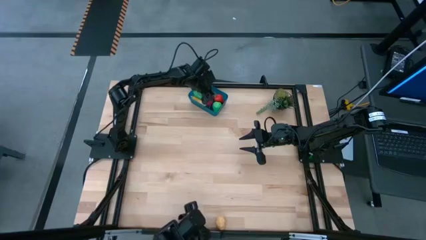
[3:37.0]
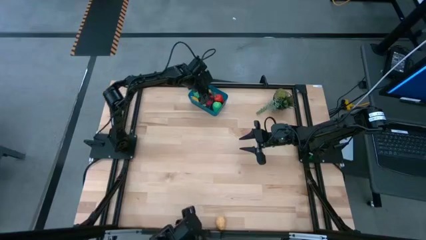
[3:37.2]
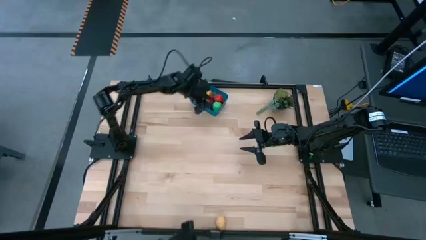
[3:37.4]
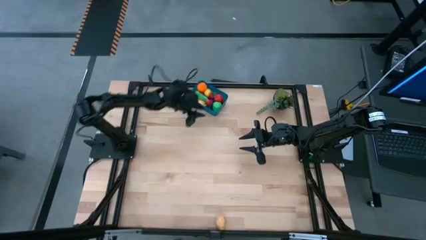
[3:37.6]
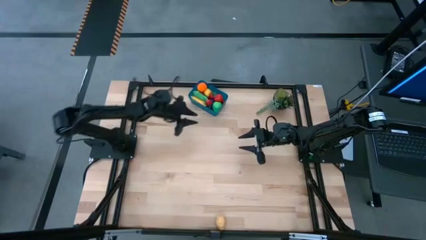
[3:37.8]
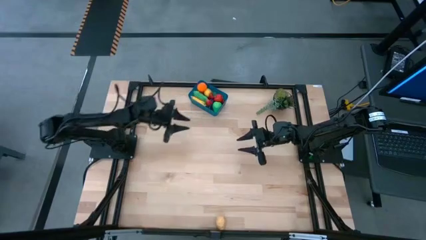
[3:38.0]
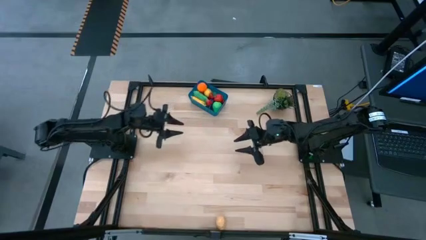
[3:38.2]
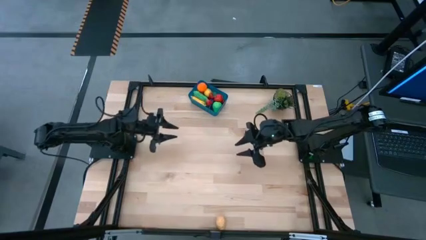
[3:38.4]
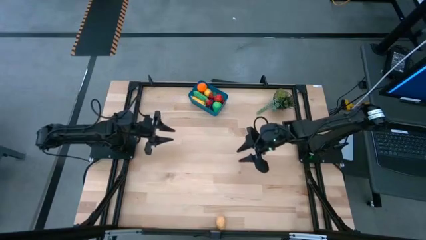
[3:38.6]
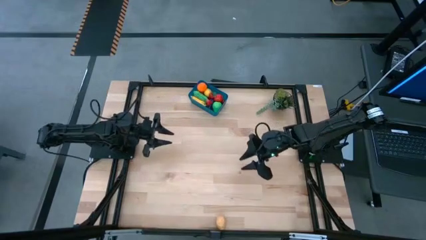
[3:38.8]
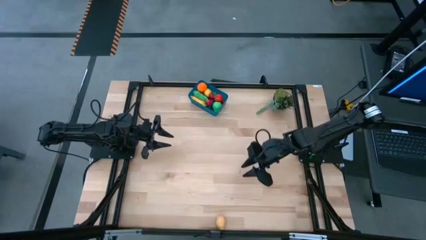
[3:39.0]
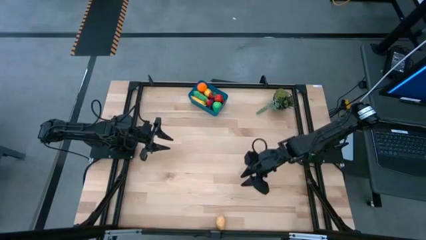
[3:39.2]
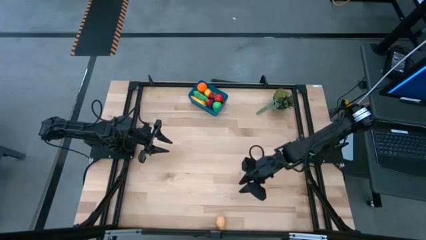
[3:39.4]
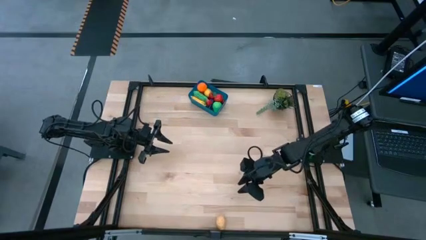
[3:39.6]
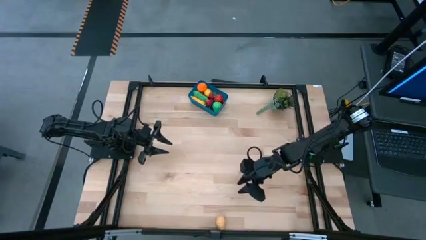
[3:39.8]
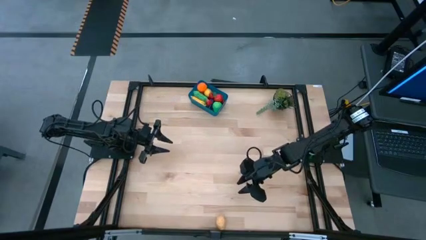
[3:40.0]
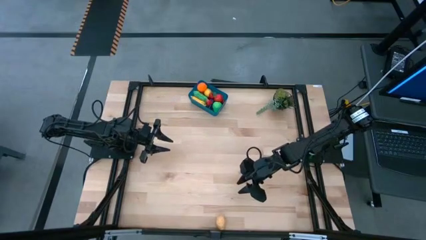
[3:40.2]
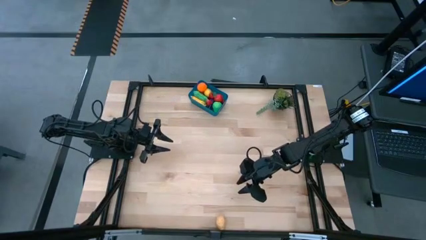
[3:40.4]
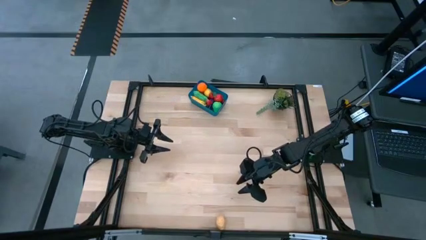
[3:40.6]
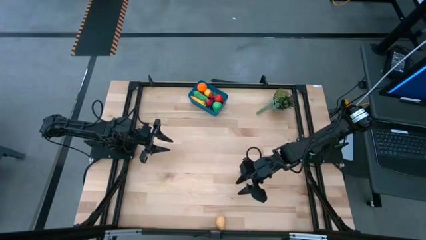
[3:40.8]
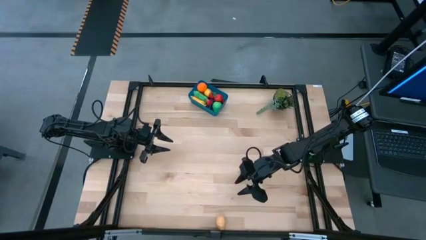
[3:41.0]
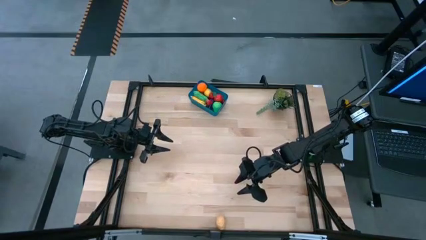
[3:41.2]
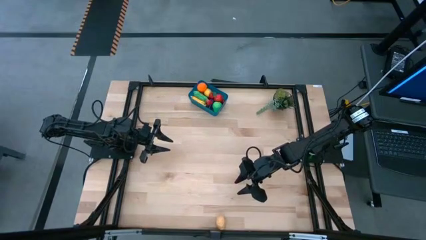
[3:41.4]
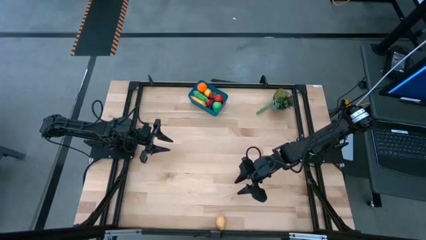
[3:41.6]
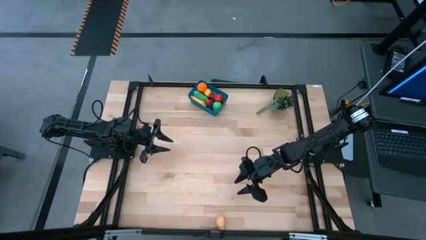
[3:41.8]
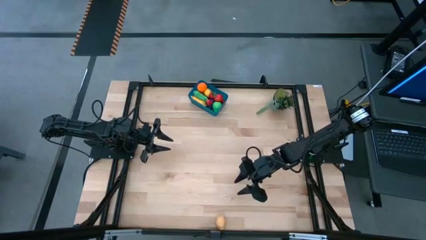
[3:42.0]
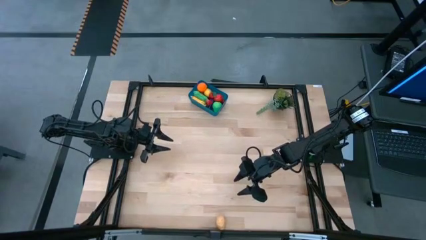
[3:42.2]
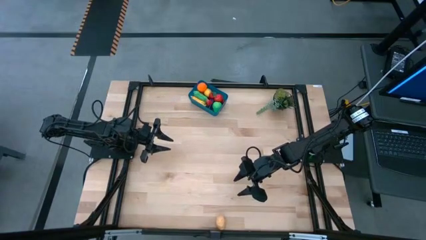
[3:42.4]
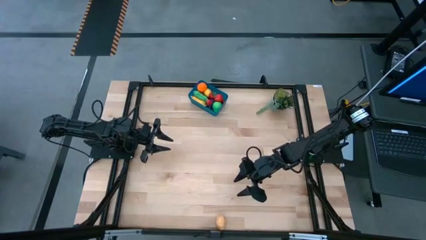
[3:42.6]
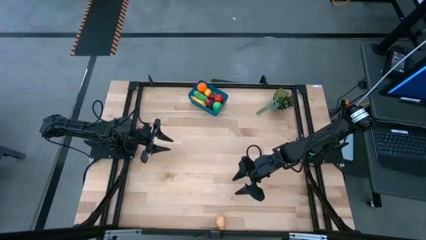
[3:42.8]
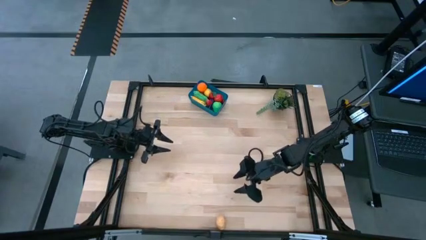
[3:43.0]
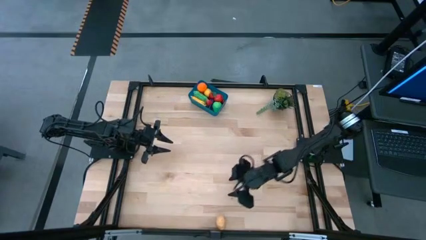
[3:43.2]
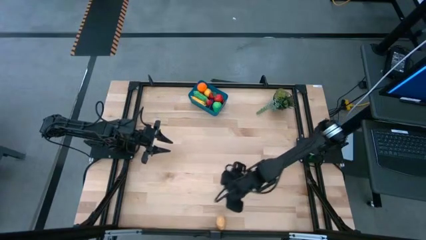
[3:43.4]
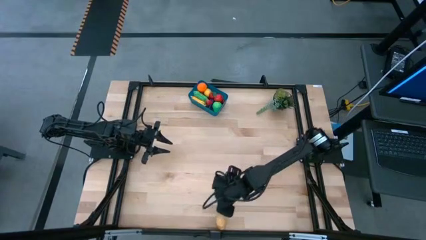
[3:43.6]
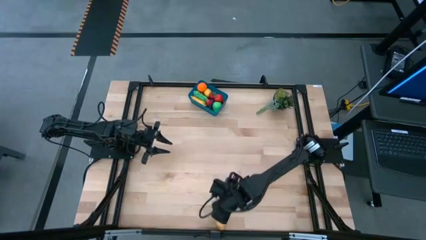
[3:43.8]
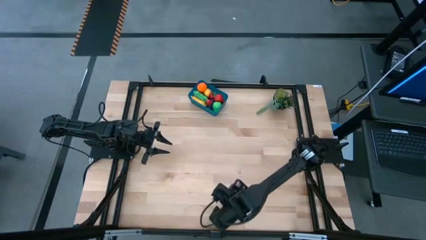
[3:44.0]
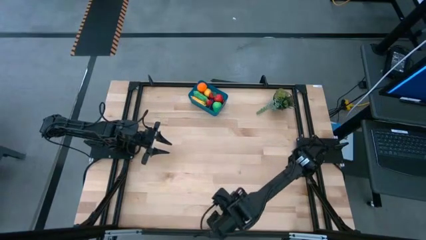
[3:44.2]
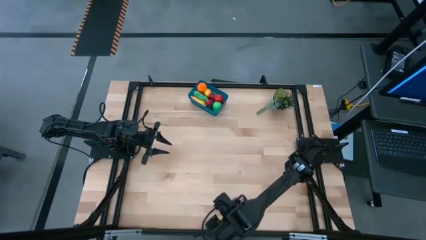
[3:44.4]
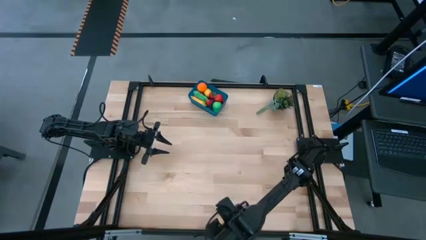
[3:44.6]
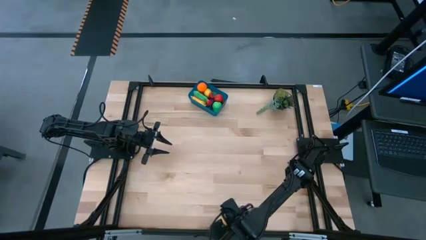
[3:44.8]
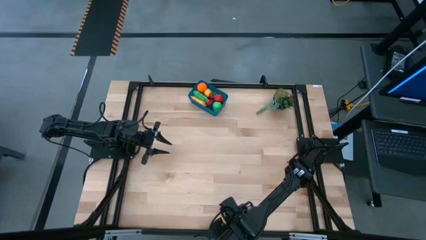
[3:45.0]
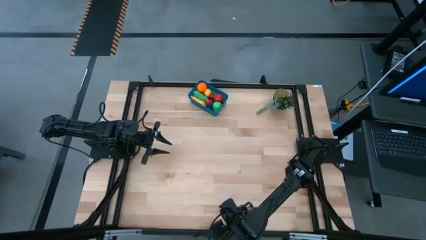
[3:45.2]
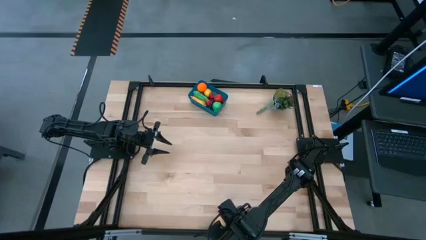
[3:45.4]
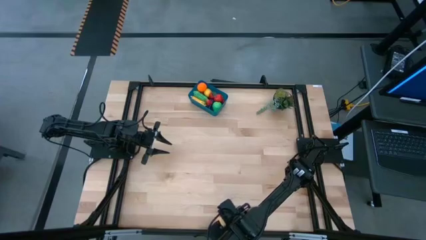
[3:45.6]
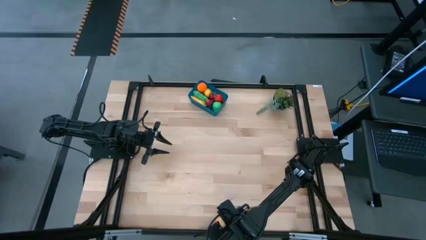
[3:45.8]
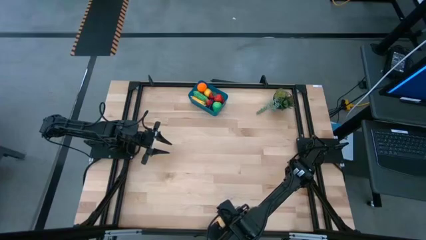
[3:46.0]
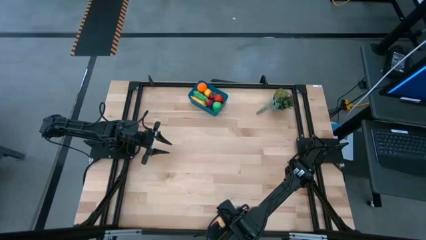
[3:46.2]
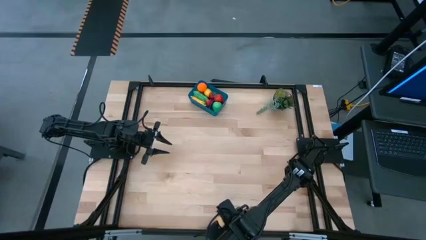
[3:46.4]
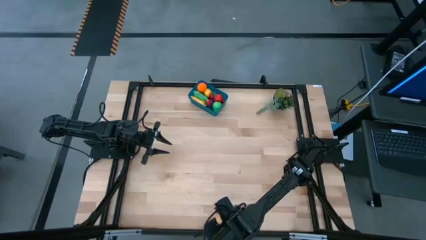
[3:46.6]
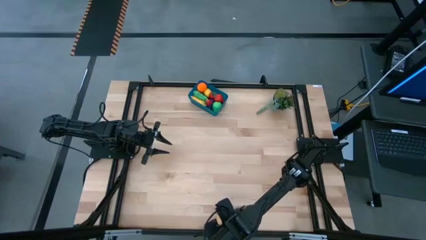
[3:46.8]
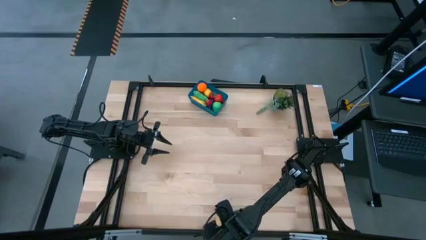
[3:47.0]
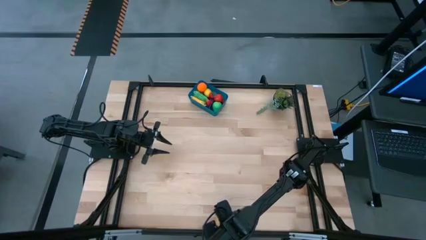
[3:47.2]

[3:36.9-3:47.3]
Task: Pick and placing Produce into tupperware
Put the brown potato into the blue bin

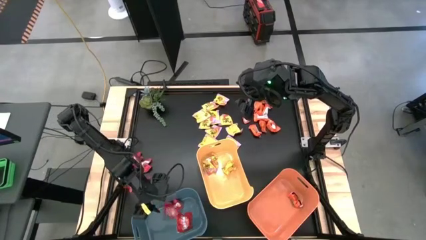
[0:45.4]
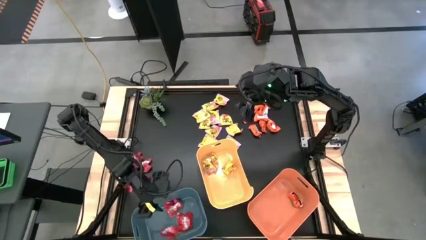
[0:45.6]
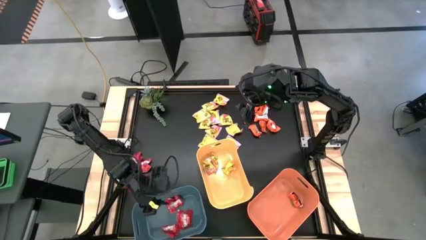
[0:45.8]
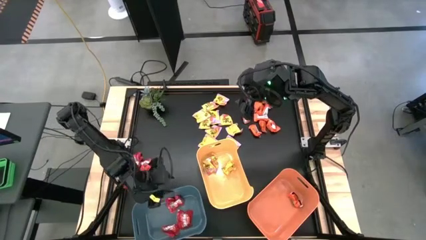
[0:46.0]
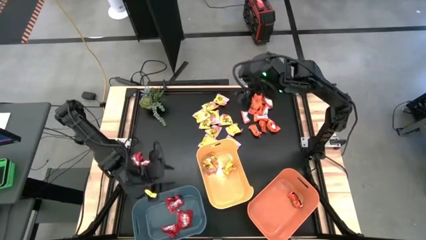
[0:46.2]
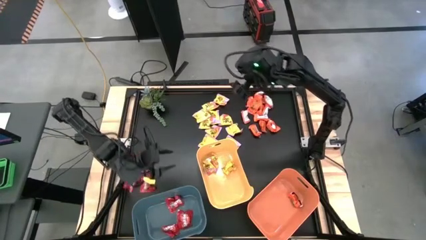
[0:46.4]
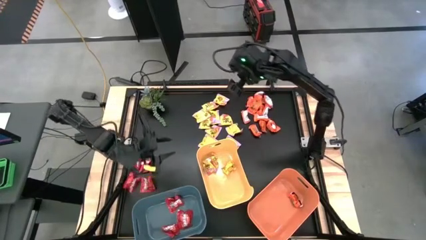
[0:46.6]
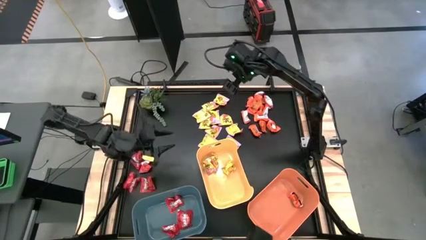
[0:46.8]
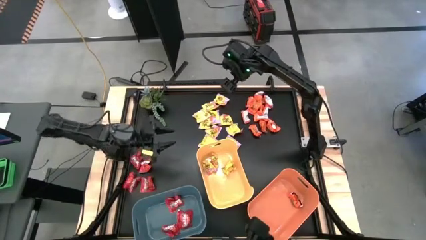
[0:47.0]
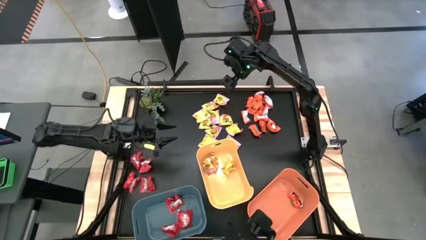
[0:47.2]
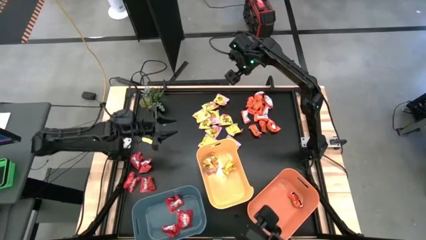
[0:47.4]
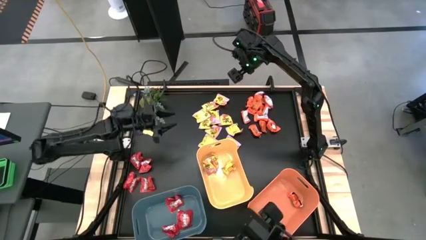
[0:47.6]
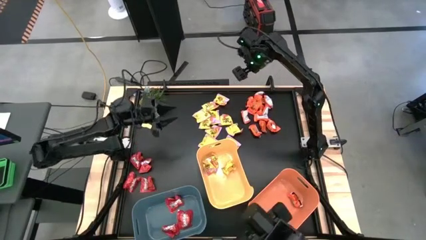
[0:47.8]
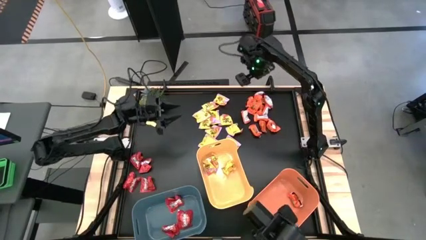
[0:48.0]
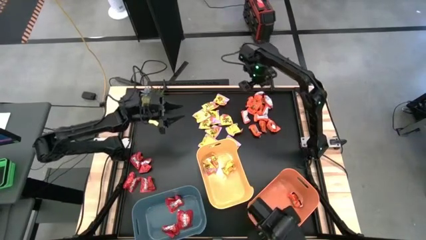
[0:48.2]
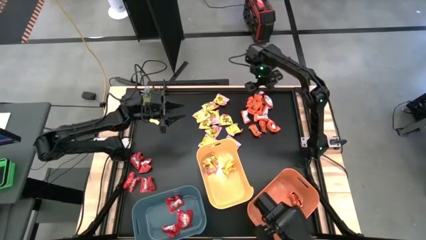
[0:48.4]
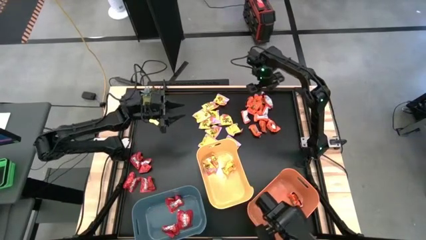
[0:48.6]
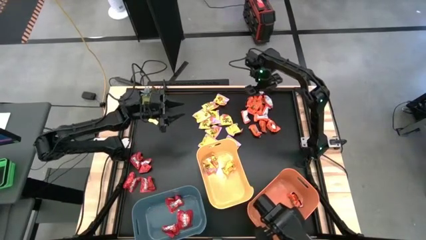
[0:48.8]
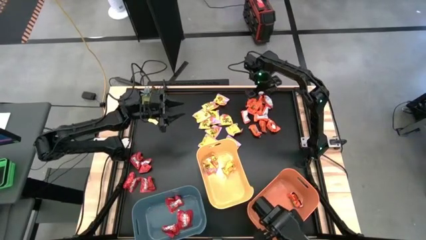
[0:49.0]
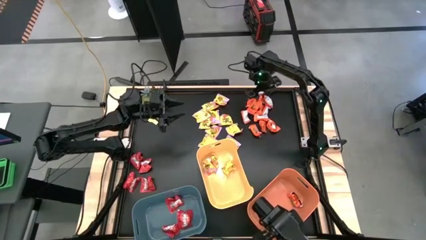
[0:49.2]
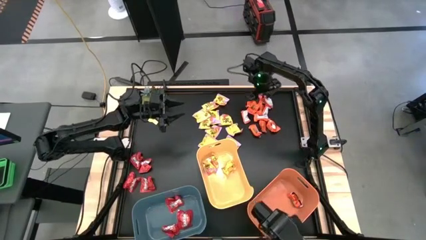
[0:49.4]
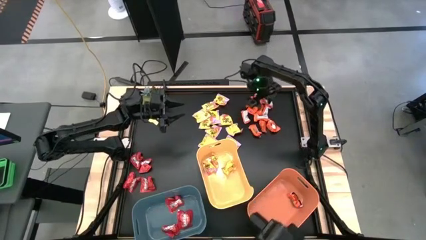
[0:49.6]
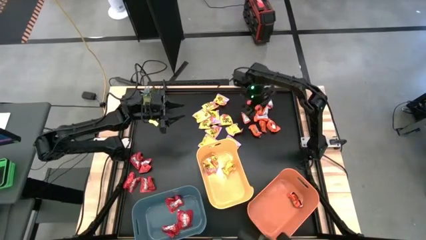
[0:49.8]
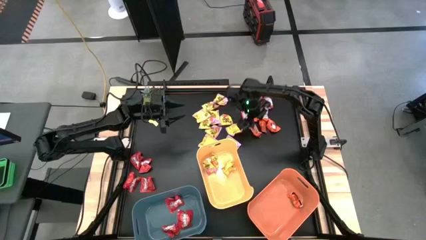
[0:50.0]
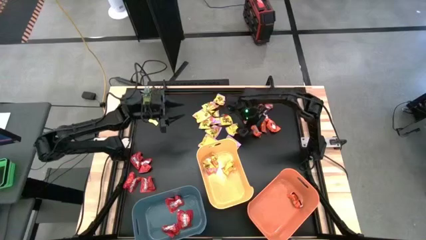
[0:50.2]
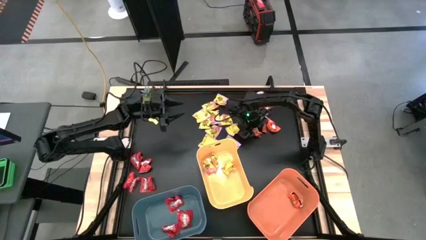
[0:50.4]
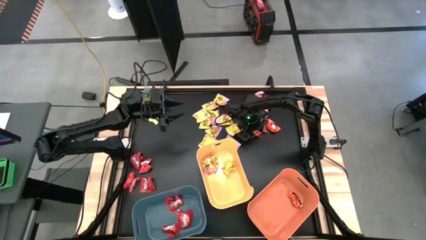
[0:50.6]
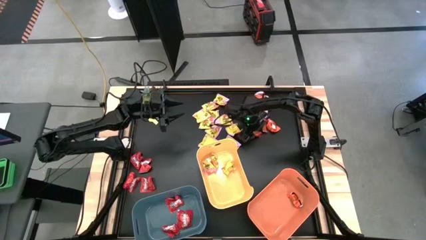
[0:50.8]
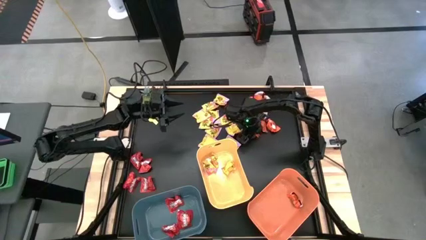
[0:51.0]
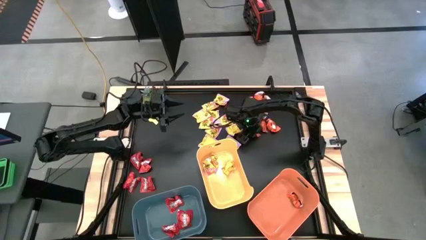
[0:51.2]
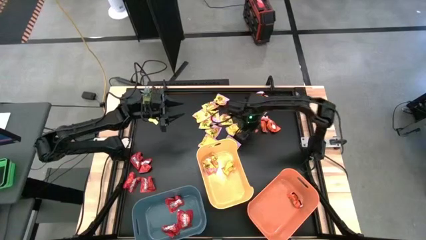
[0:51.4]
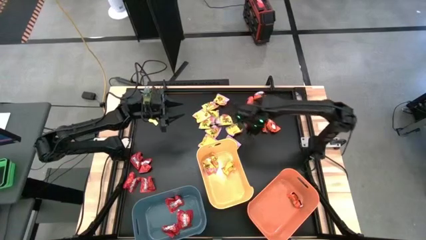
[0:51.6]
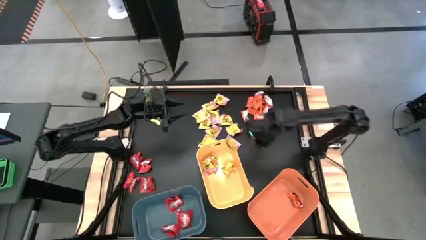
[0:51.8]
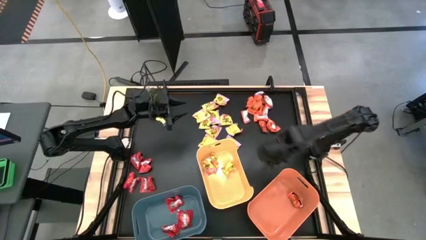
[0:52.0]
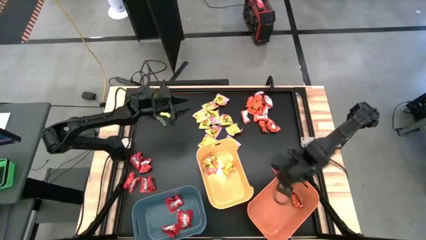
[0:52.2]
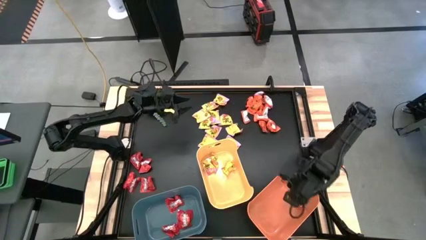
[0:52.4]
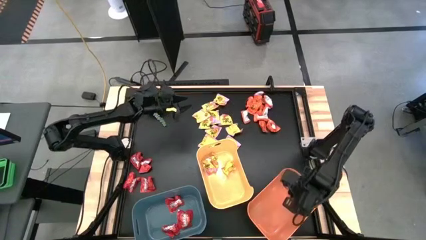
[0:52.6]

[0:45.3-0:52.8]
Task: Sort candy
Put the orange chocolate into the orange bin
